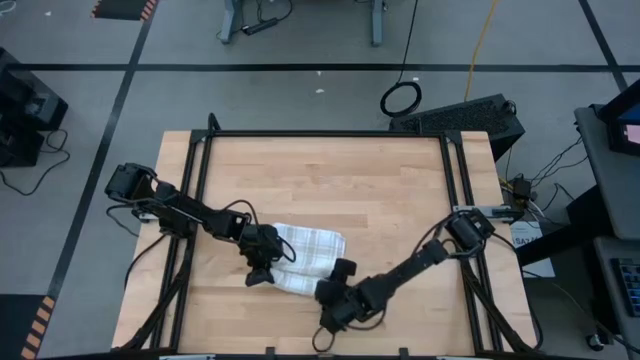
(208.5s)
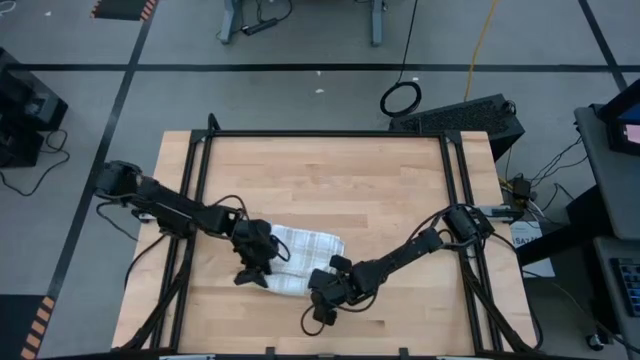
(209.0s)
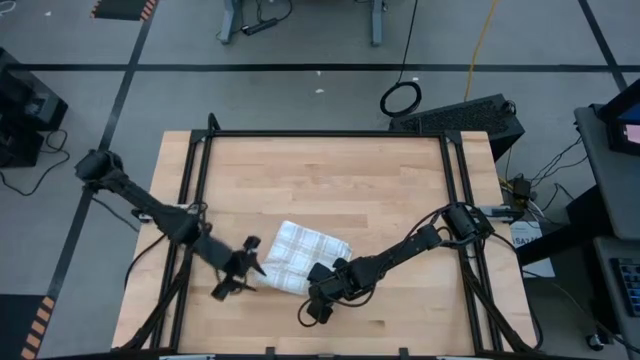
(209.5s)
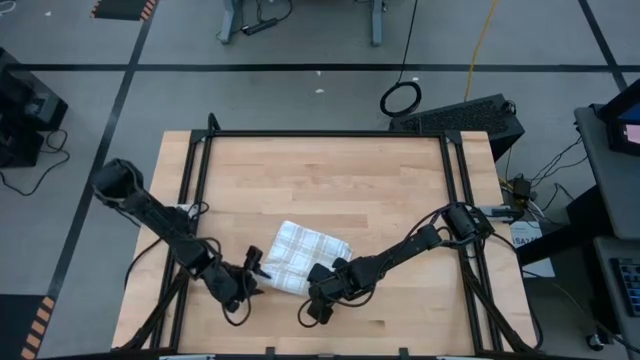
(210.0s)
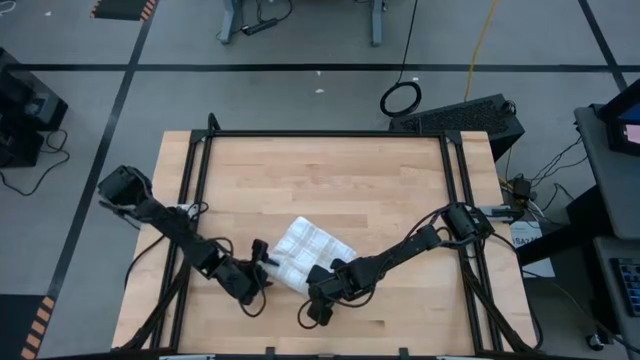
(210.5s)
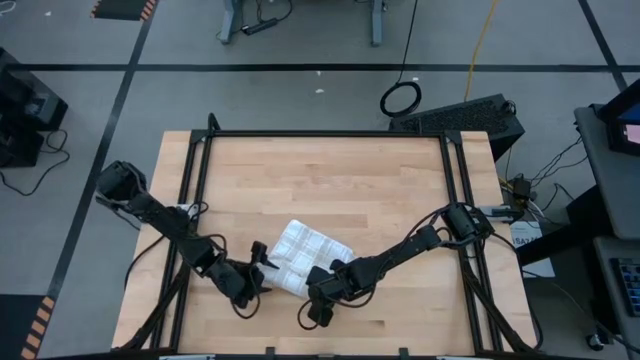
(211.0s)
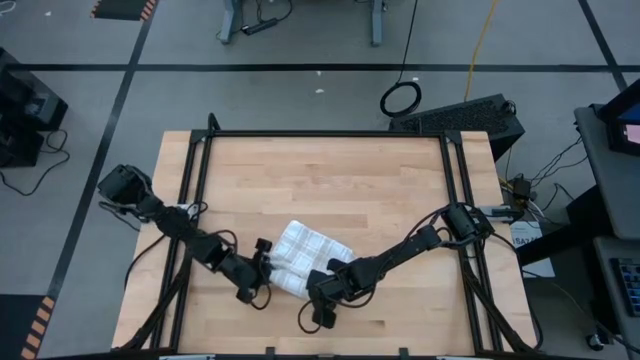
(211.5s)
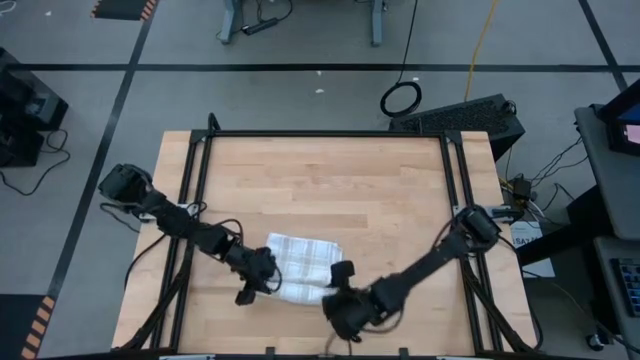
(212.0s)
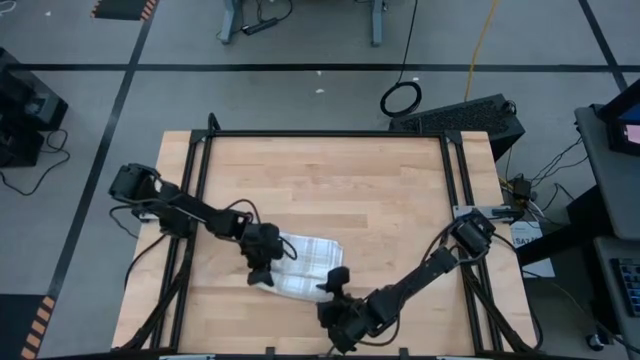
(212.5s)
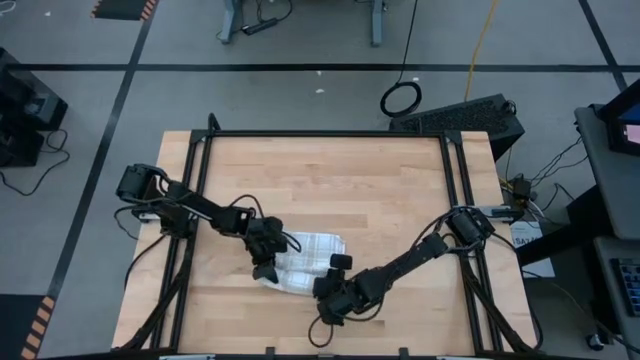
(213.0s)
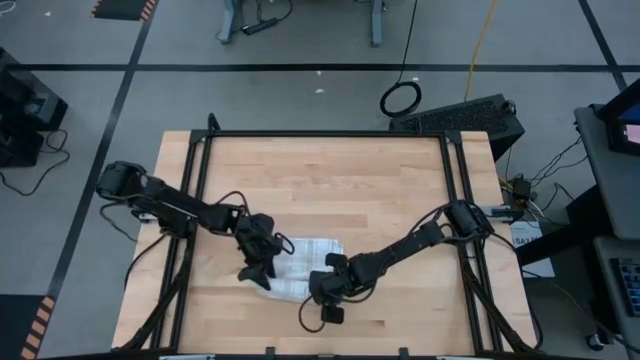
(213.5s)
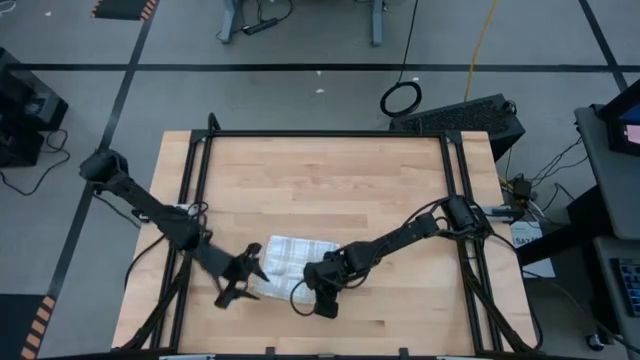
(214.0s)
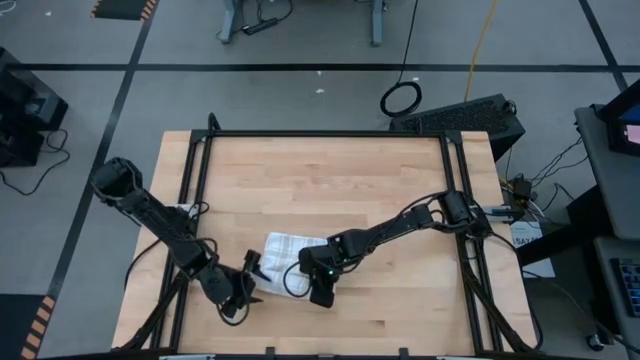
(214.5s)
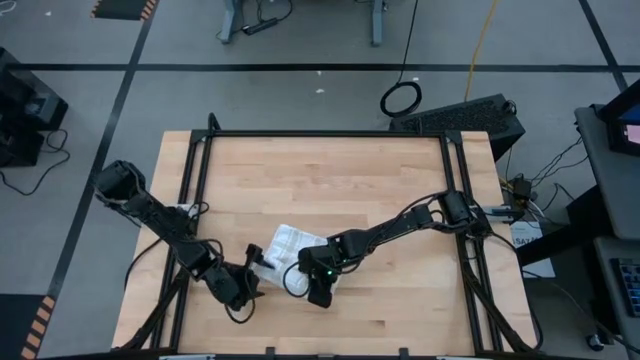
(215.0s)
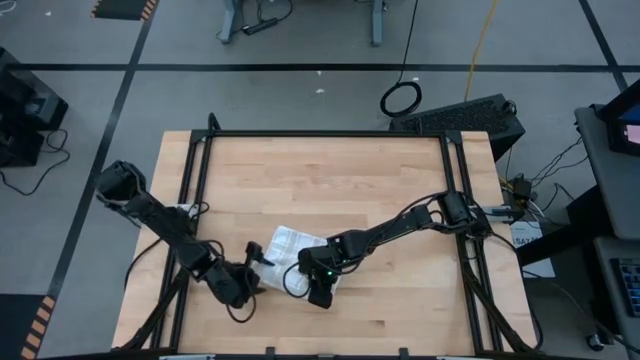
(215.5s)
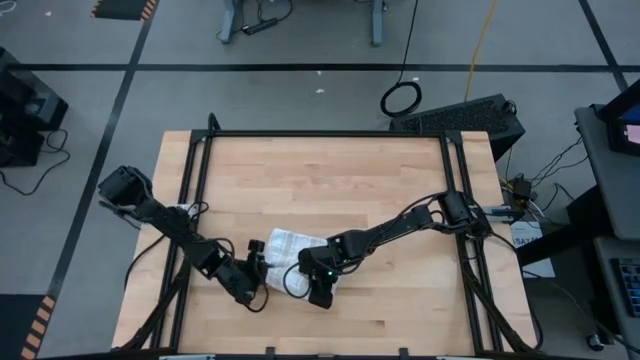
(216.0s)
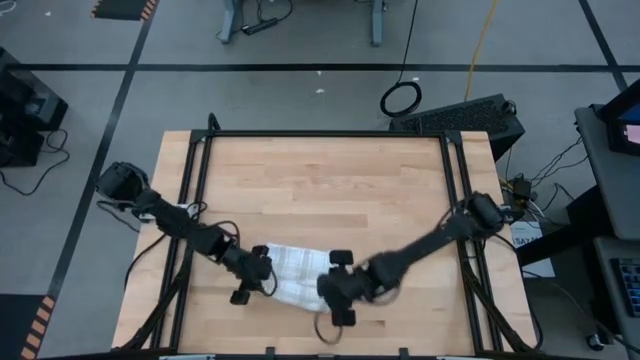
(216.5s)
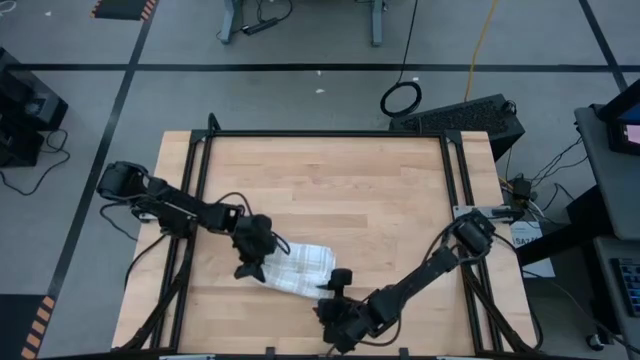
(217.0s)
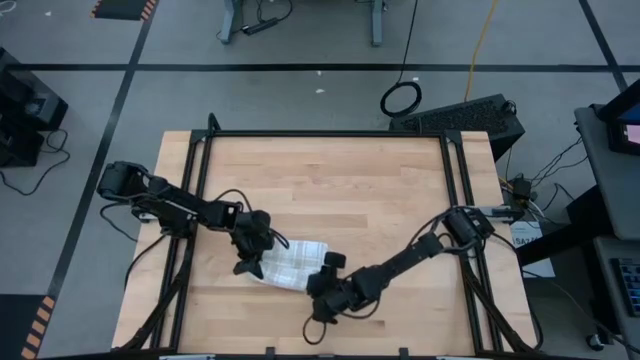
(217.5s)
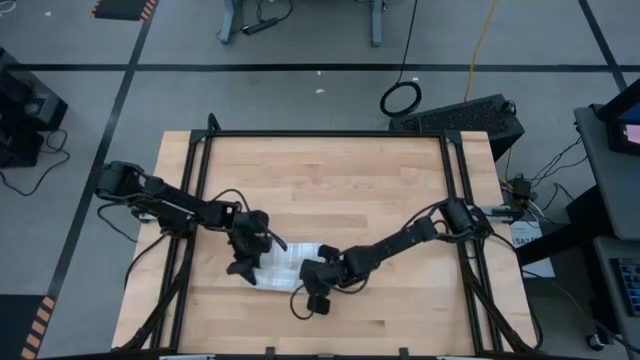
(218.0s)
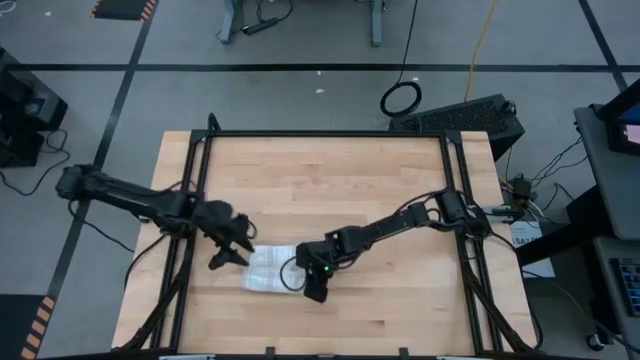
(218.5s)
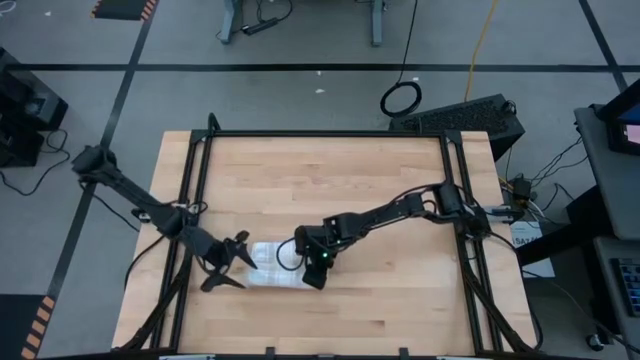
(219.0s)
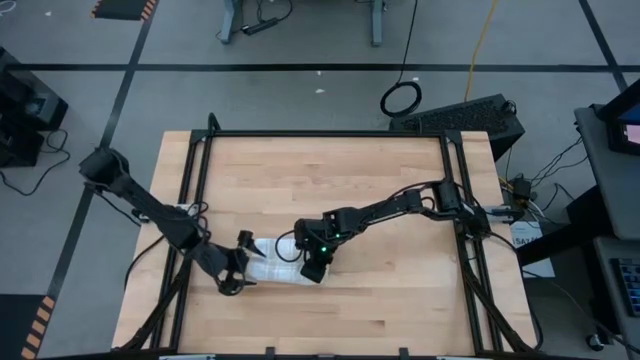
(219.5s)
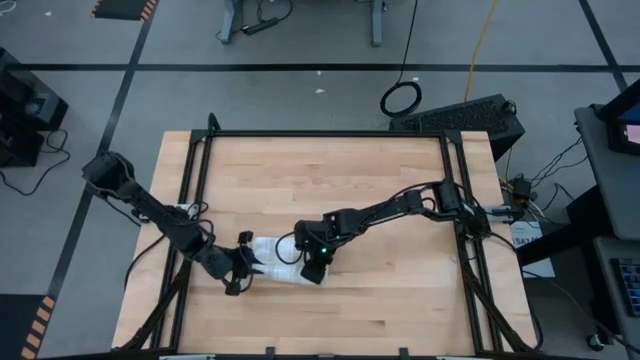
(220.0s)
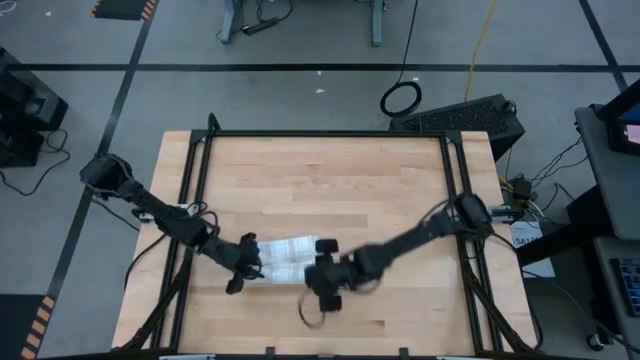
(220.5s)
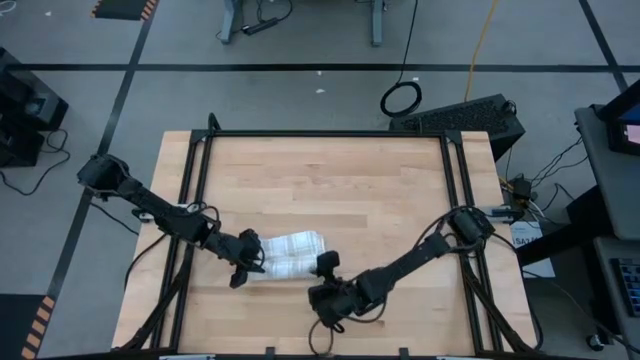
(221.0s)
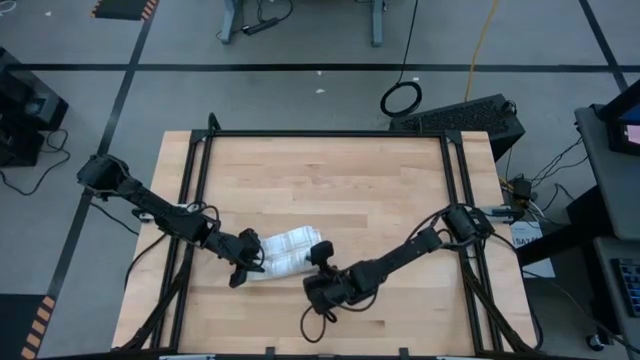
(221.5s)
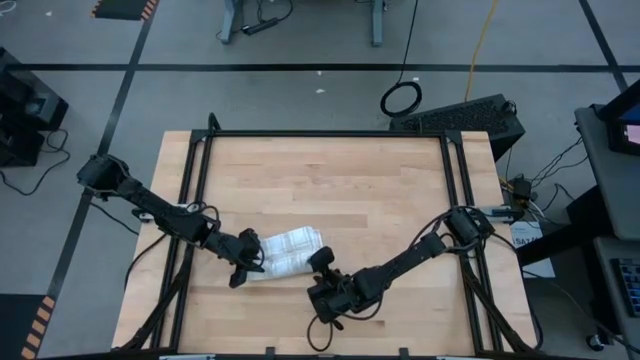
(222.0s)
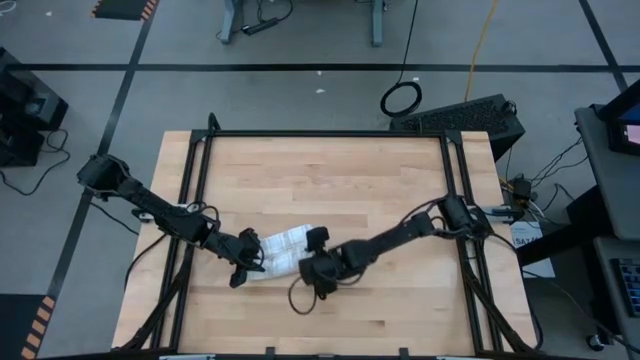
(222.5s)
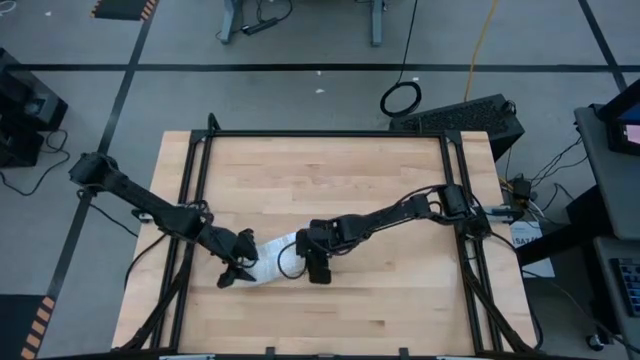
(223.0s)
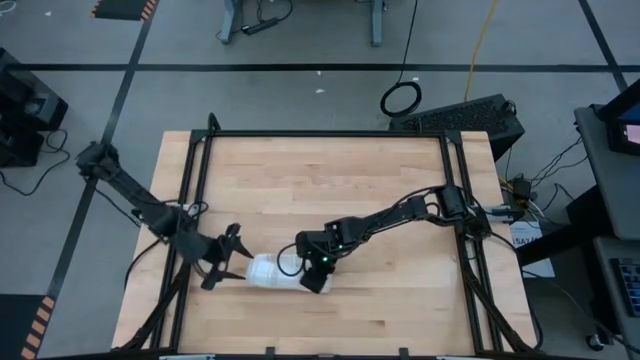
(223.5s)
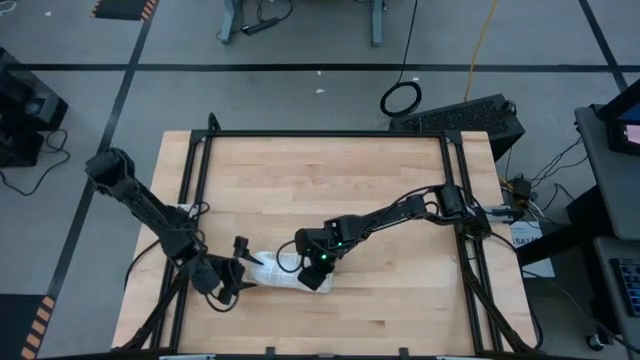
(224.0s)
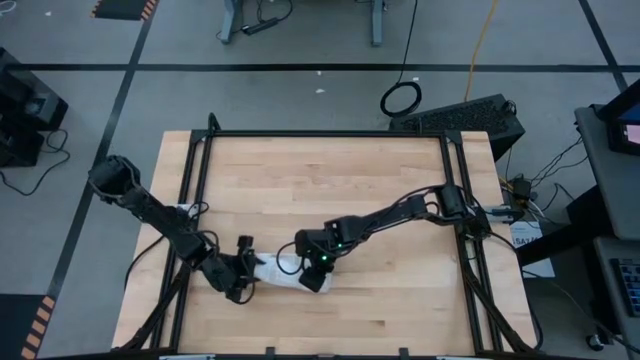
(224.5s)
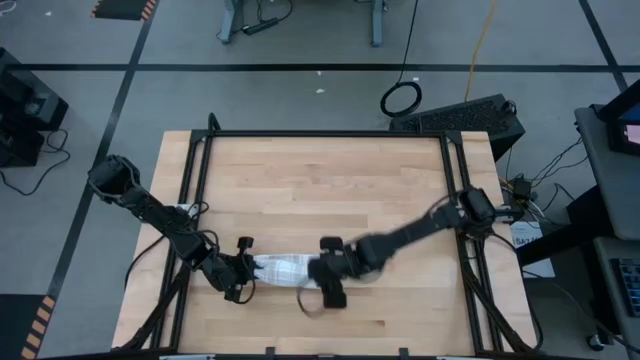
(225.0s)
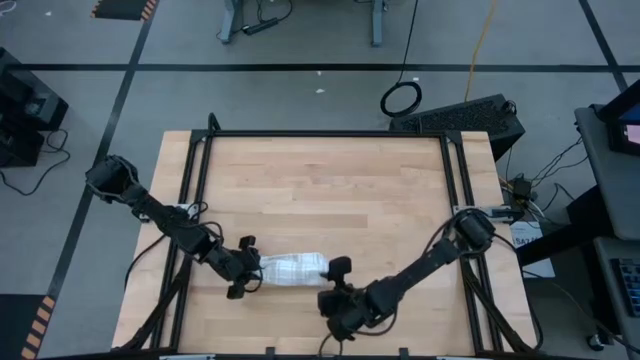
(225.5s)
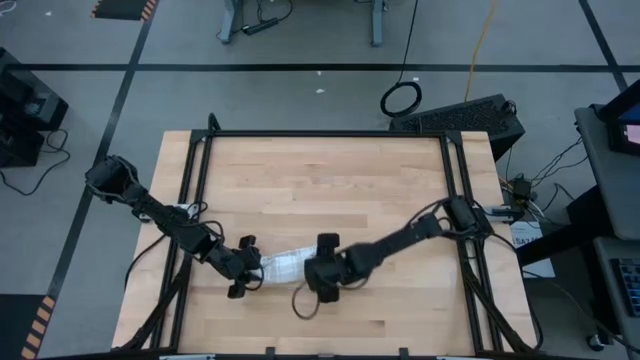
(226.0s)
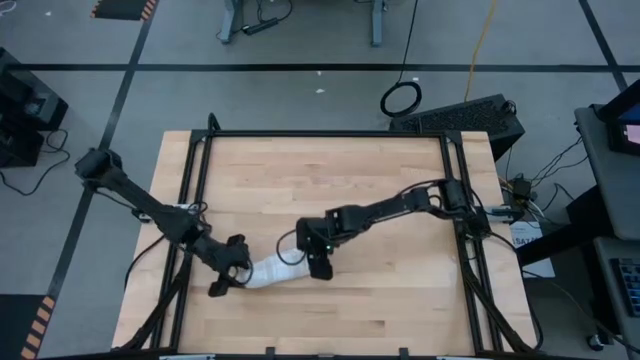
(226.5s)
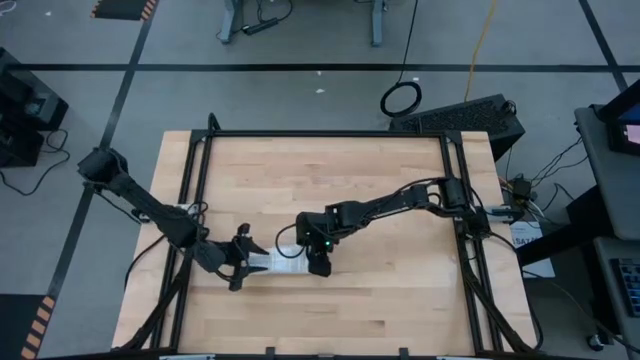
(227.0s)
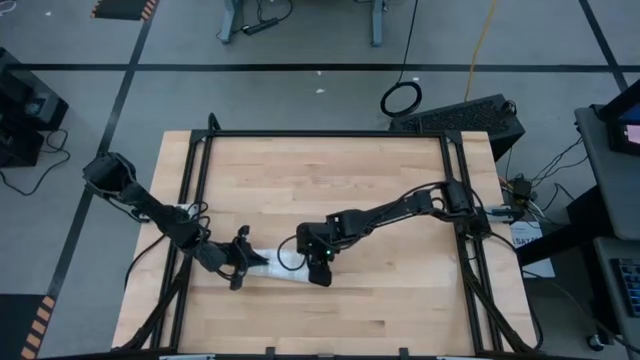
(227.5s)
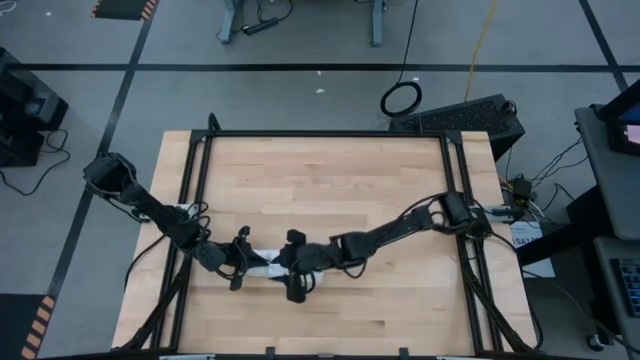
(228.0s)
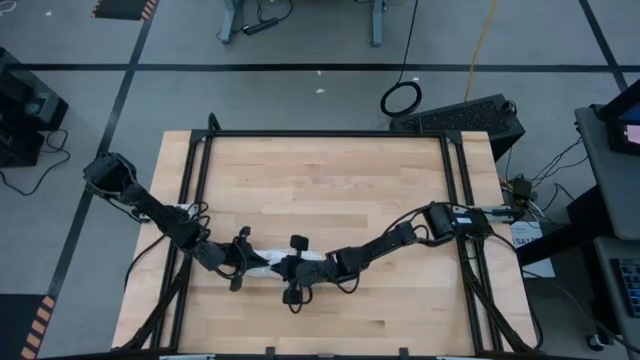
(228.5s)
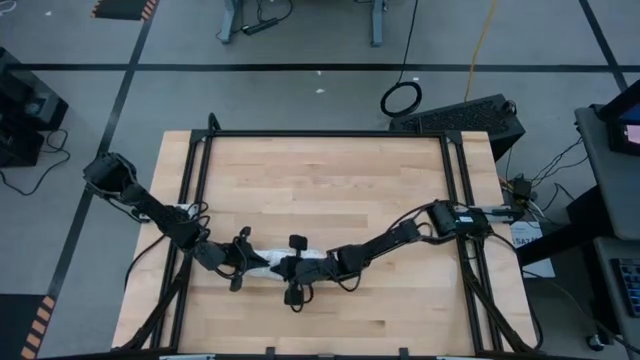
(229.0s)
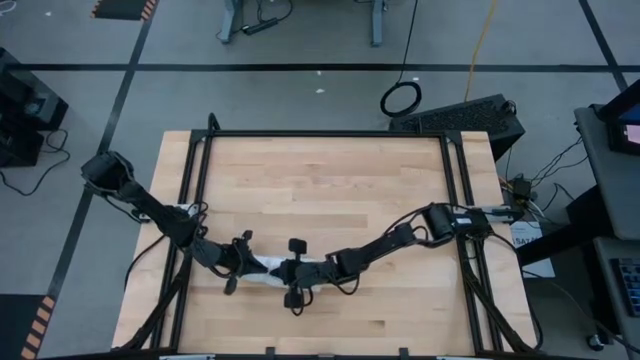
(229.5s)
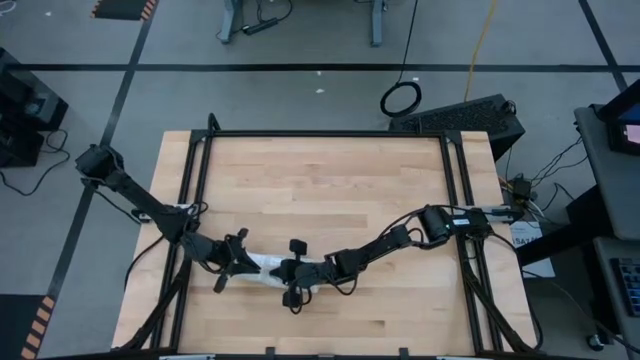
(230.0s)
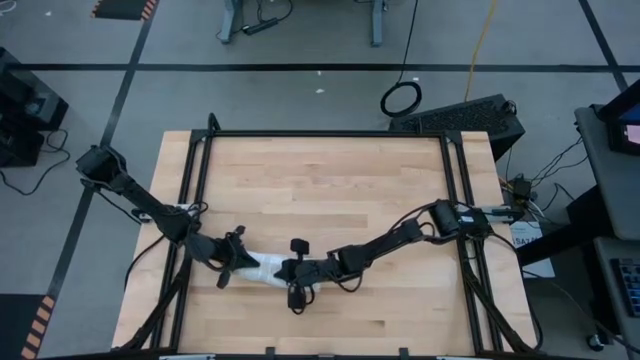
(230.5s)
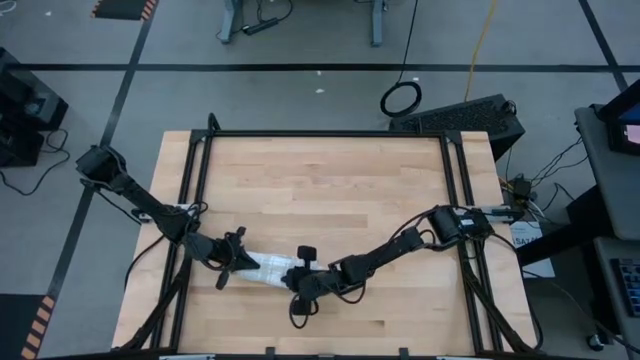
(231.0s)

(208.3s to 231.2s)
Task: Roll towel
Roll the towel
